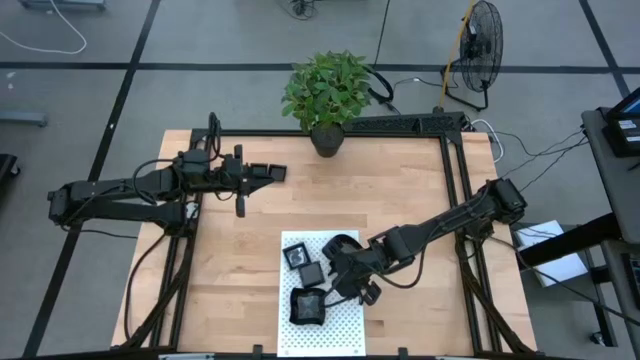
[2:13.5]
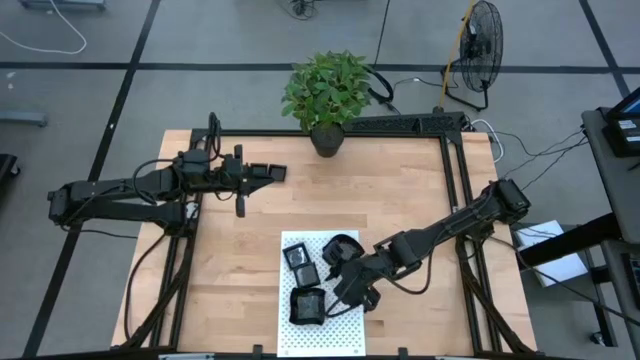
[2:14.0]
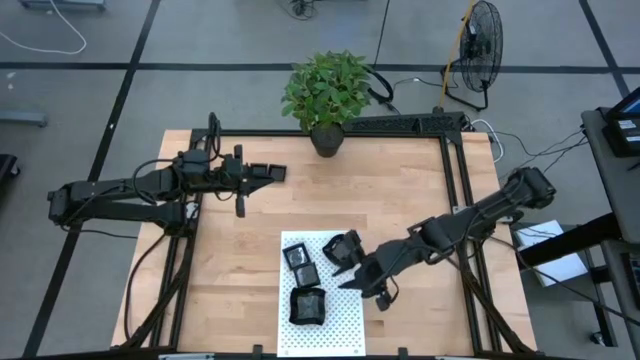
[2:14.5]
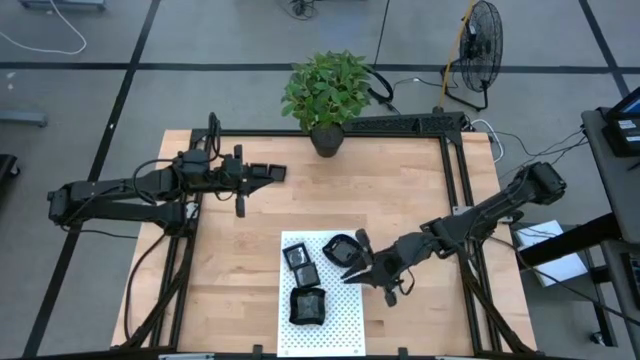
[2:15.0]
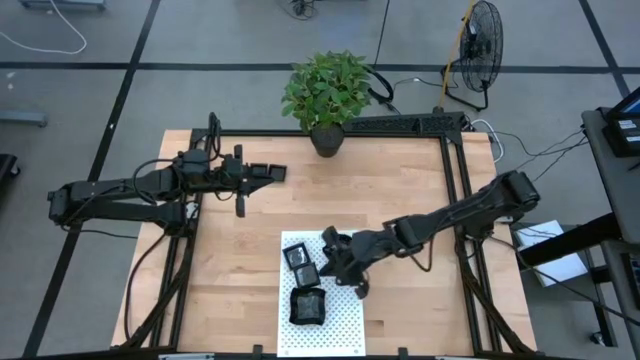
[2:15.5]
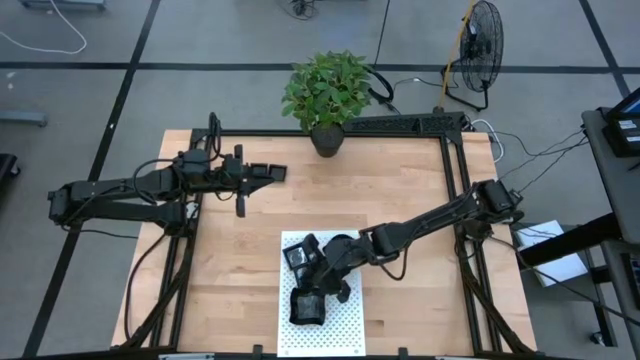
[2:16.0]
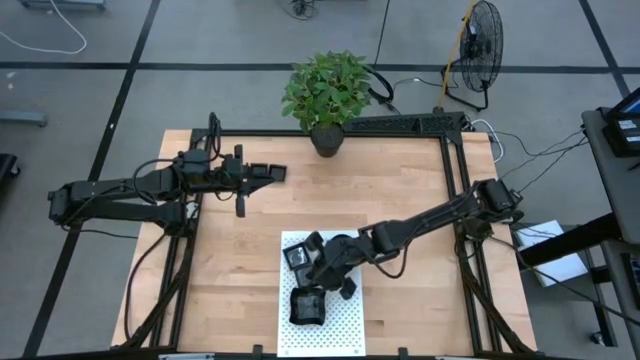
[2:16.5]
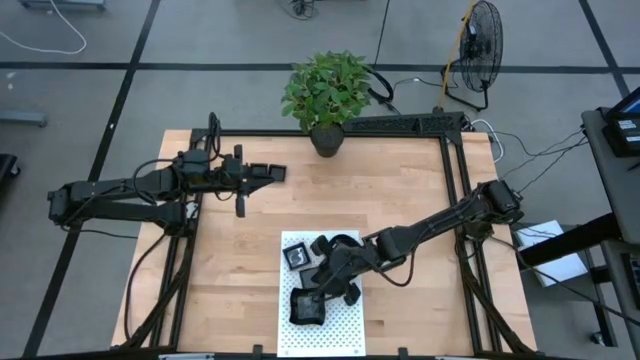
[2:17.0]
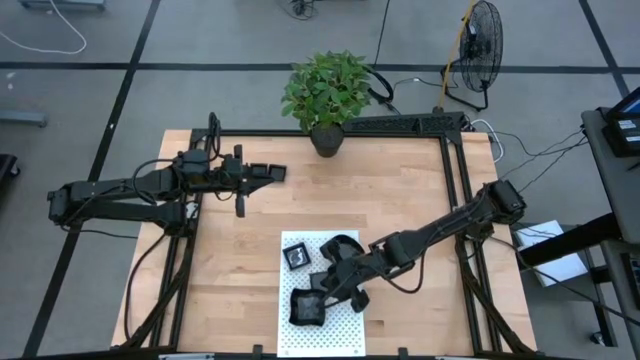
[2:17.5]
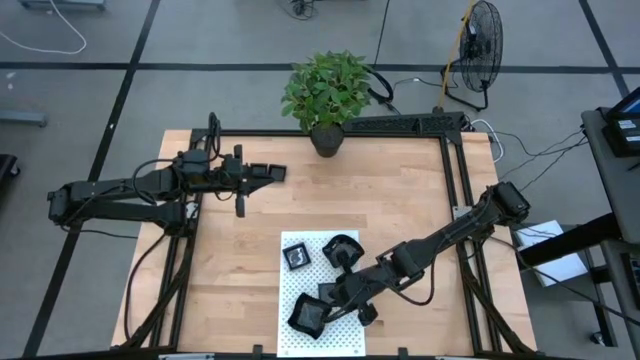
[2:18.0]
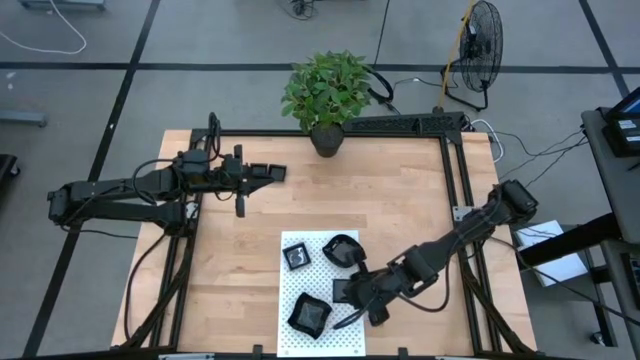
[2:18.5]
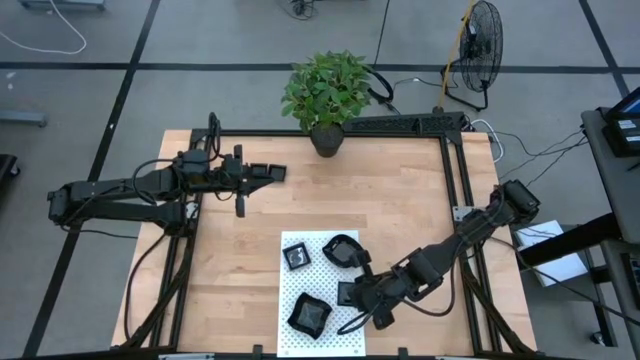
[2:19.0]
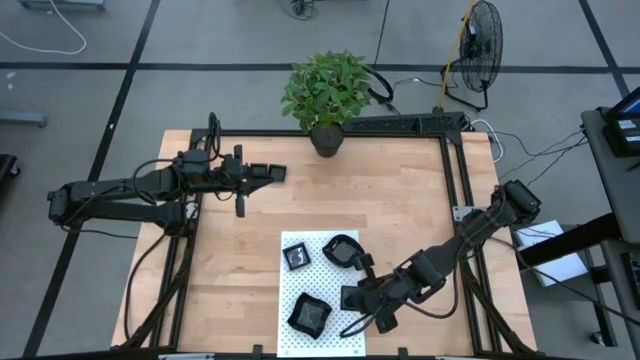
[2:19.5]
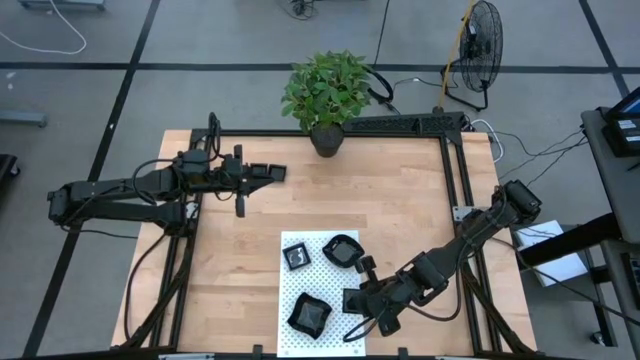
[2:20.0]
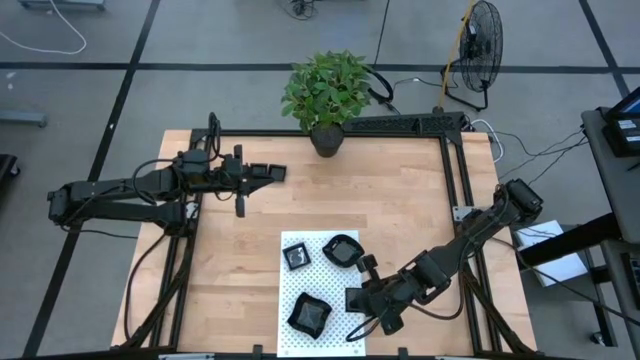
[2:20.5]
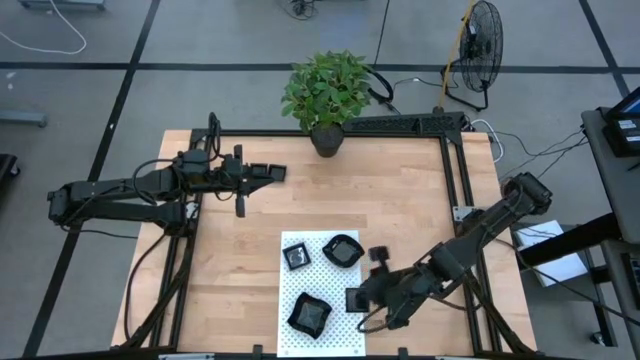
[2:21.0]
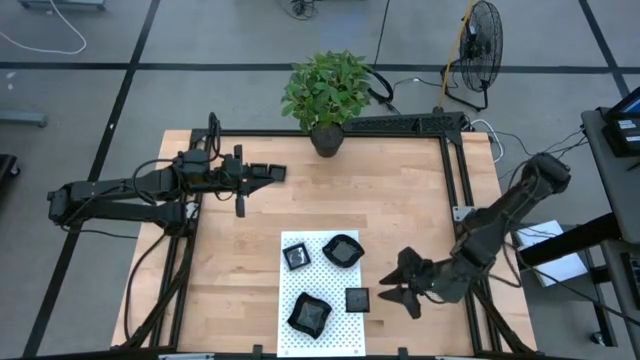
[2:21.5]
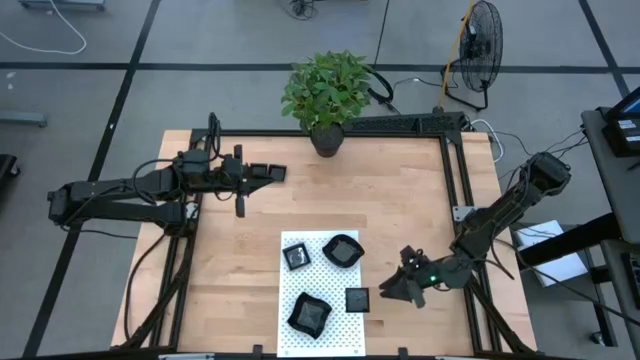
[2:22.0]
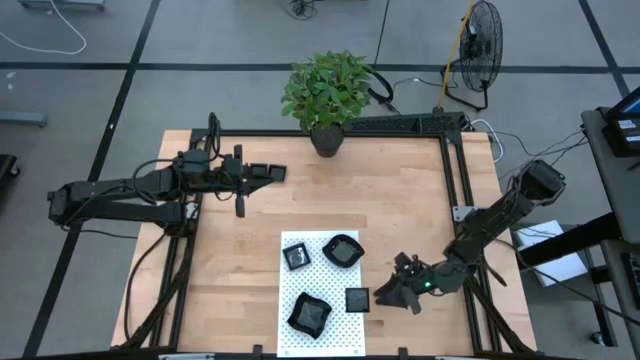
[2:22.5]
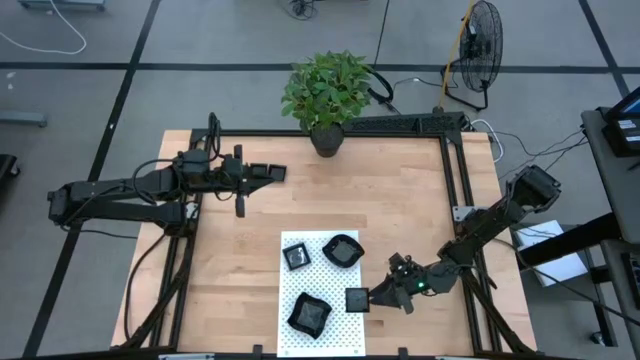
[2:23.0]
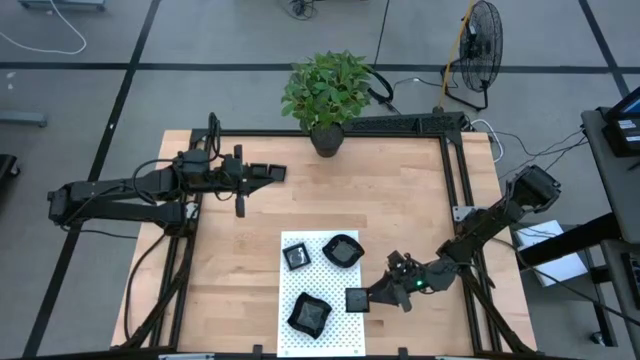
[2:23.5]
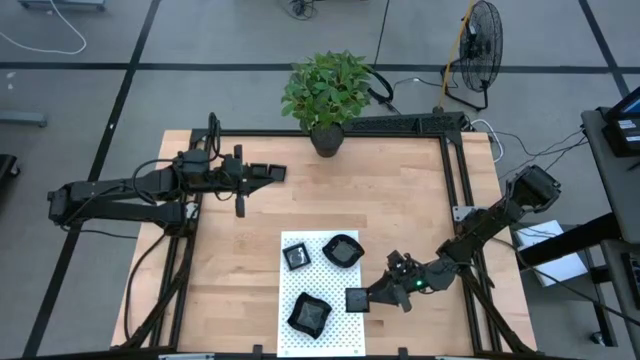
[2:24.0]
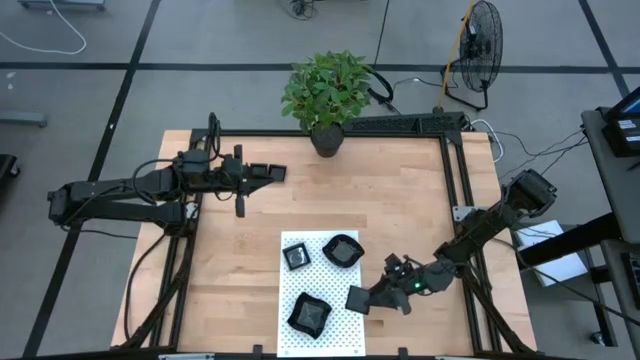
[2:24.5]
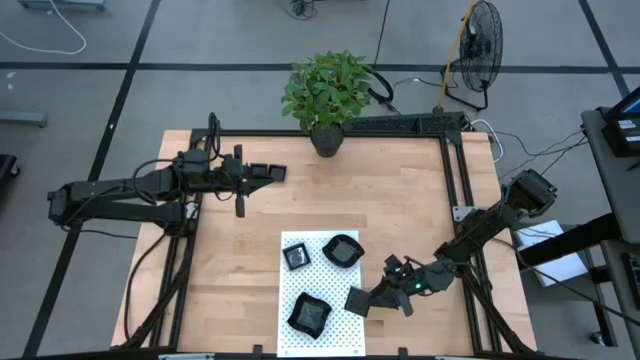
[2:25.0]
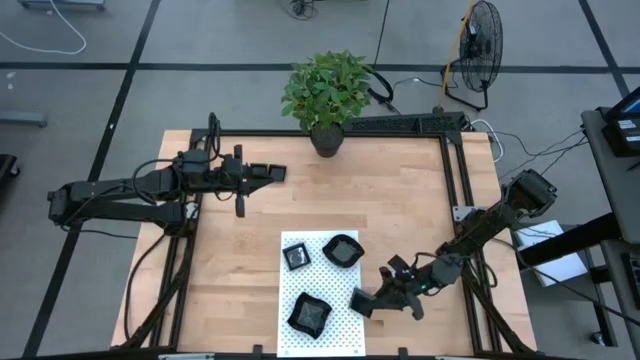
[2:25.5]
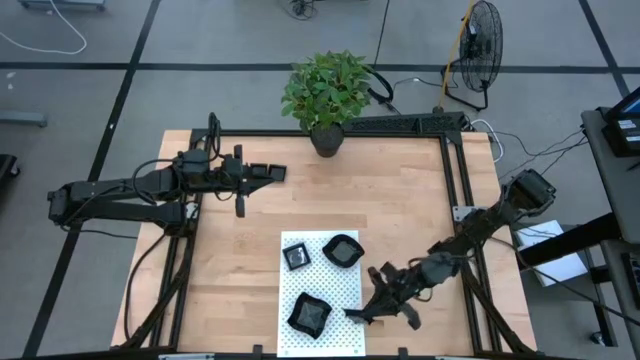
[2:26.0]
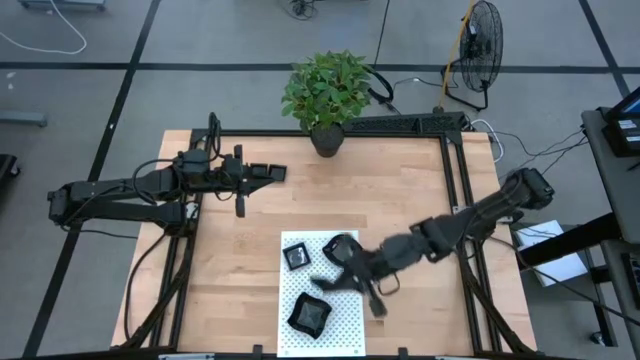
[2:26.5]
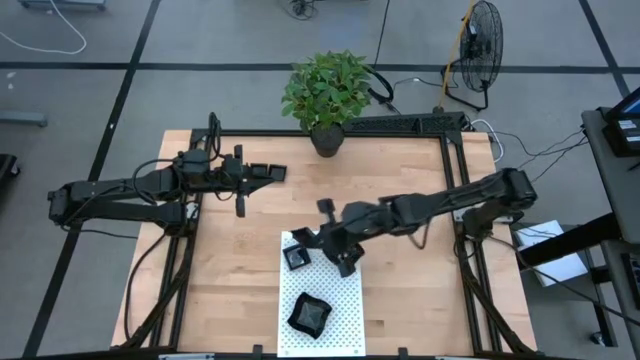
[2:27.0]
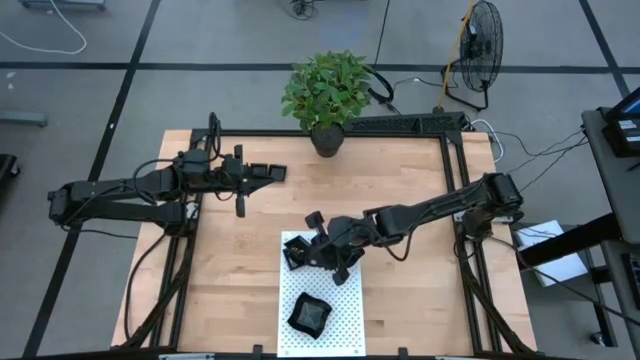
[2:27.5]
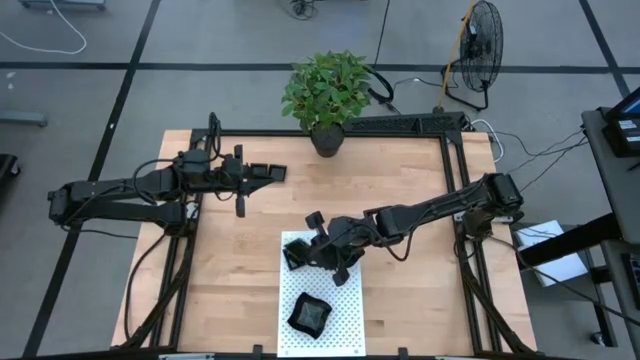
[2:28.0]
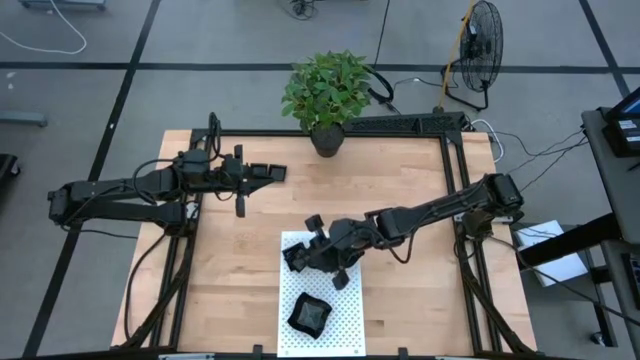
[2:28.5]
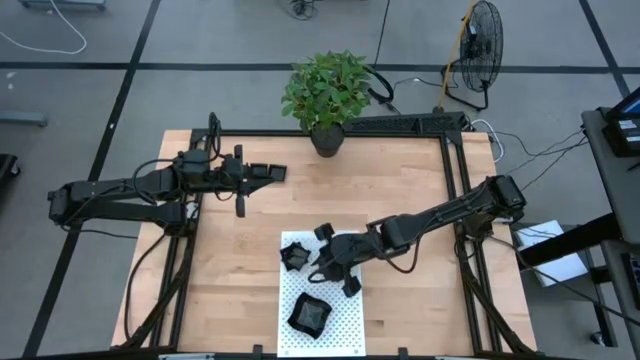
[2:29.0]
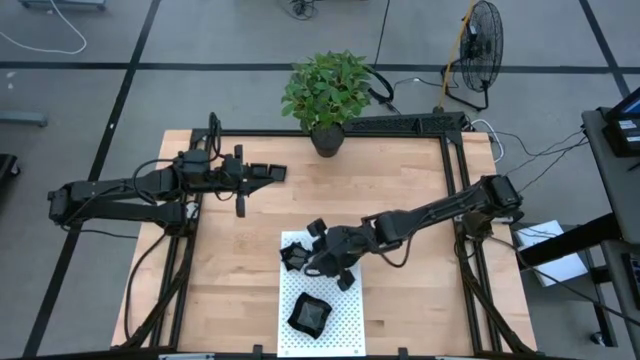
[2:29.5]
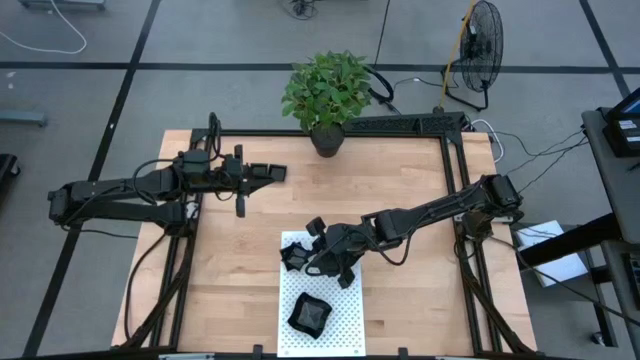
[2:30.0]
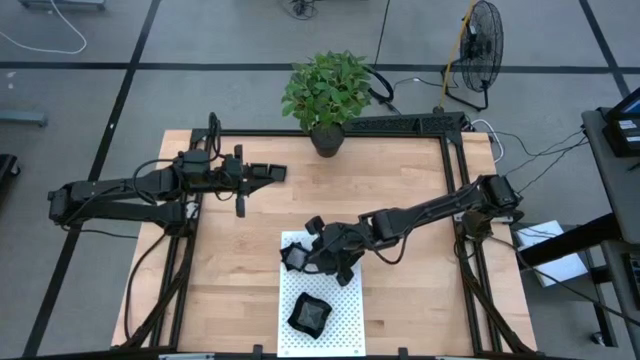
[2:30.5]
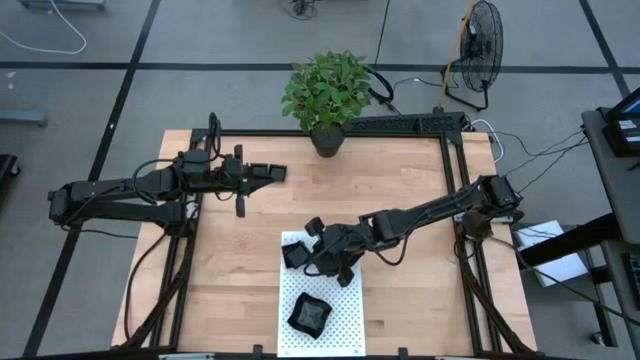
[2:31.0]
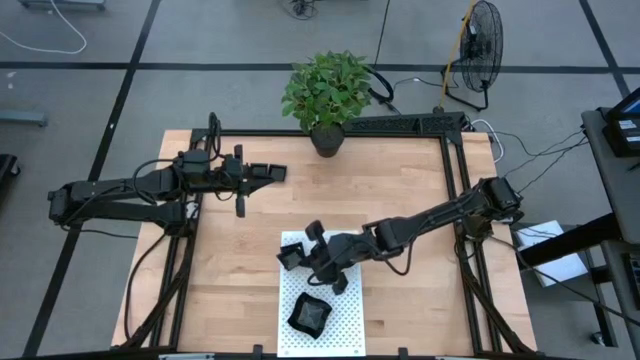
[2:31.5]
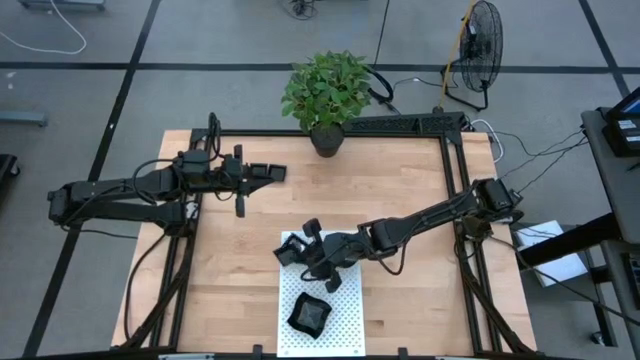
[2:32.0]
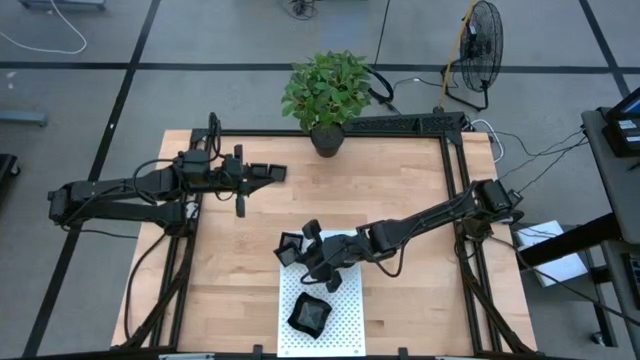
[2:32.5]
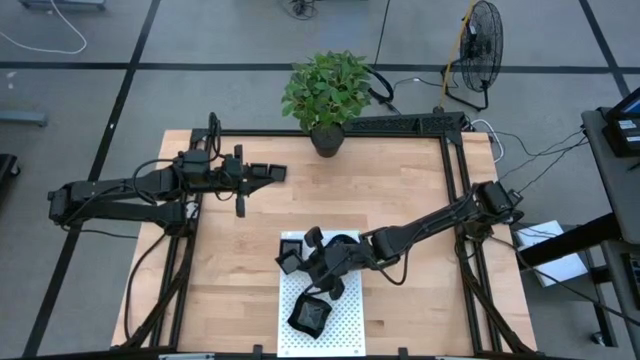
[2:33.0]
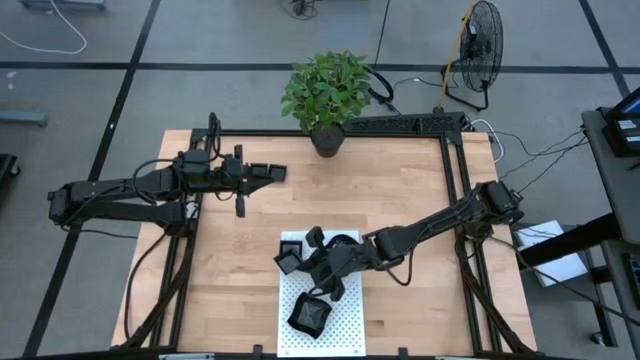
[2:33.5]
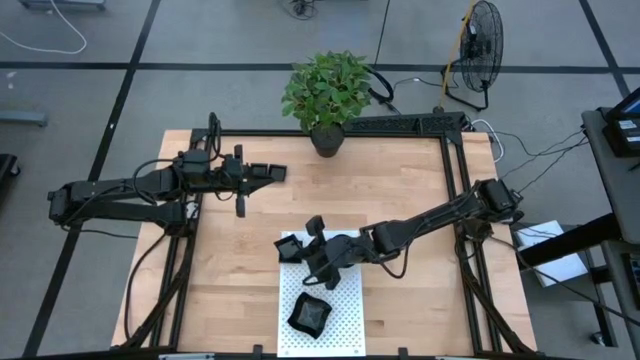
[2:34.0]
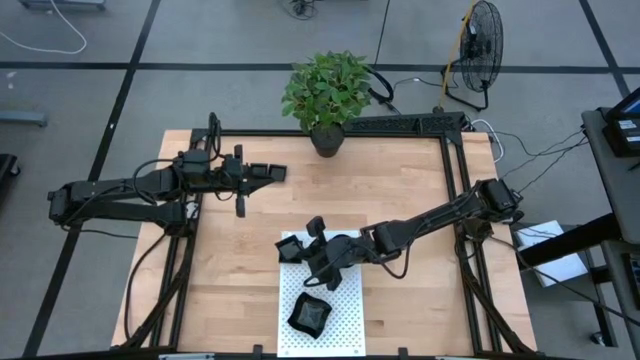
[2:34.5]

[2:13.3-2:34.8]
Task: Pick & Place Mini shaped plates
Stack the square plate on top of the square plate on the shelf
